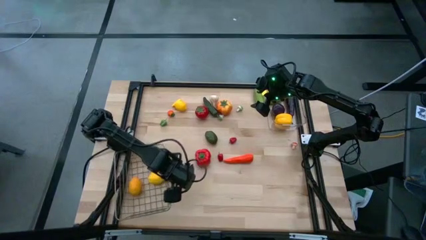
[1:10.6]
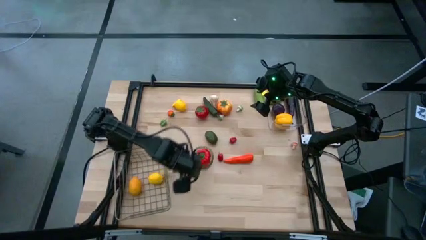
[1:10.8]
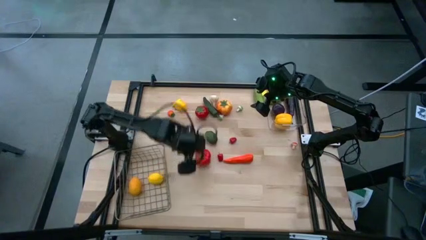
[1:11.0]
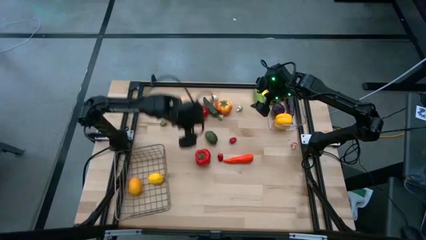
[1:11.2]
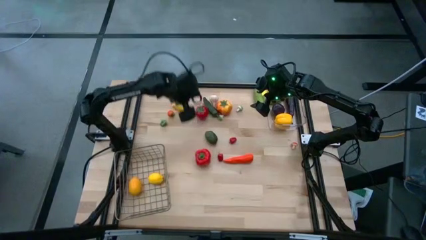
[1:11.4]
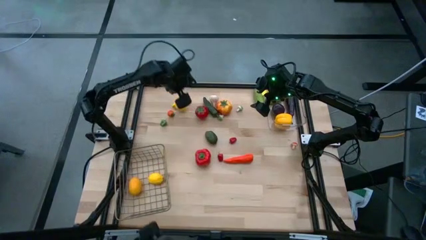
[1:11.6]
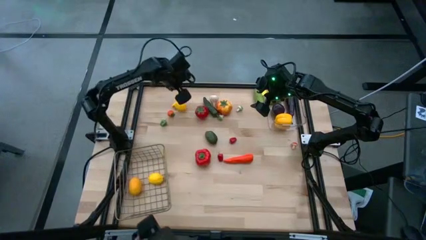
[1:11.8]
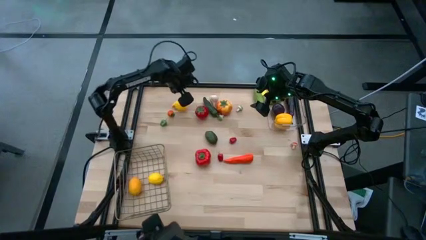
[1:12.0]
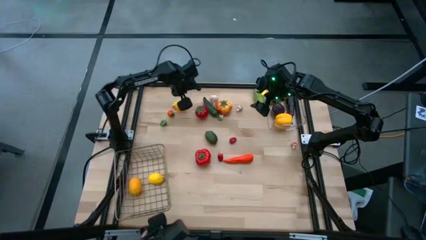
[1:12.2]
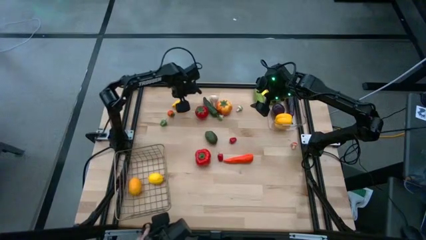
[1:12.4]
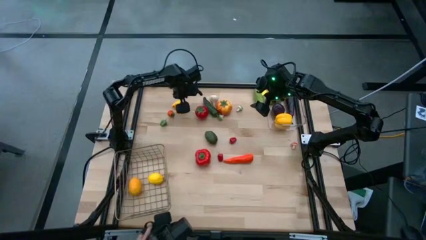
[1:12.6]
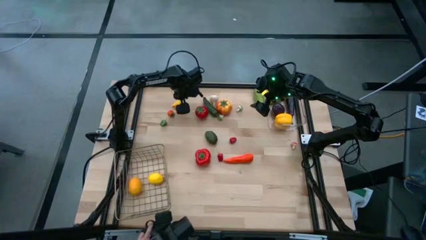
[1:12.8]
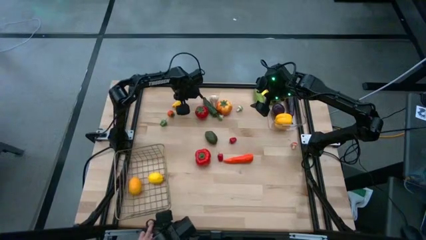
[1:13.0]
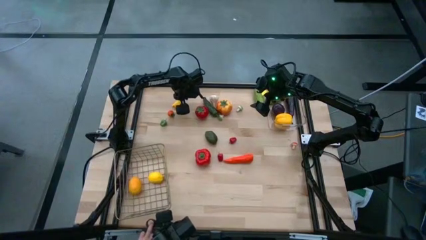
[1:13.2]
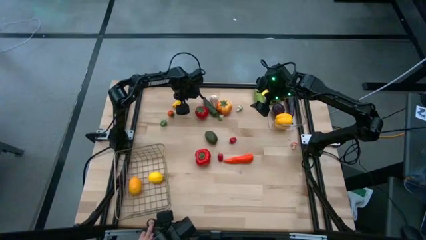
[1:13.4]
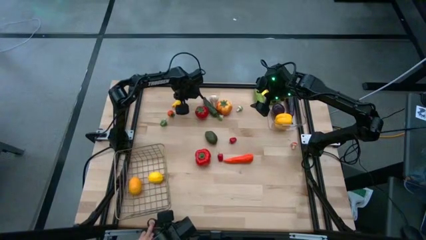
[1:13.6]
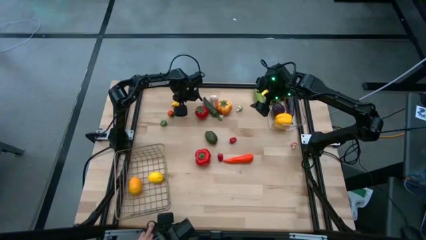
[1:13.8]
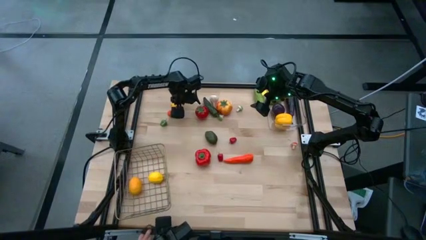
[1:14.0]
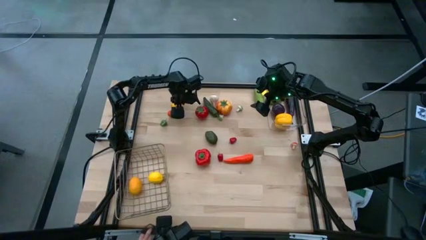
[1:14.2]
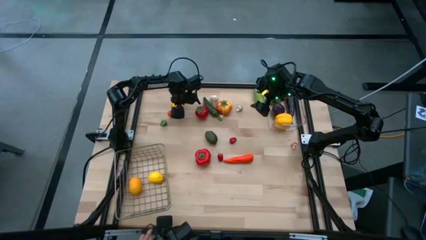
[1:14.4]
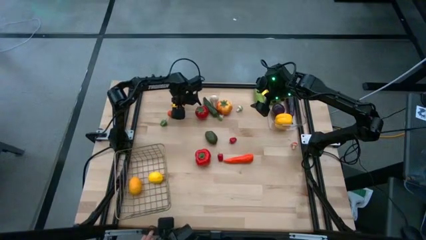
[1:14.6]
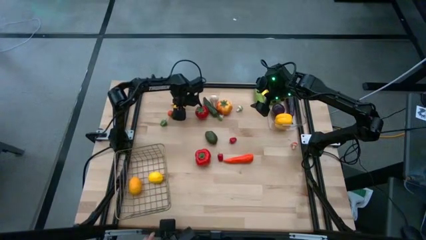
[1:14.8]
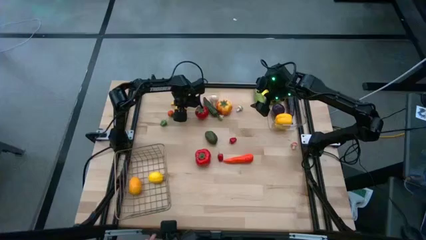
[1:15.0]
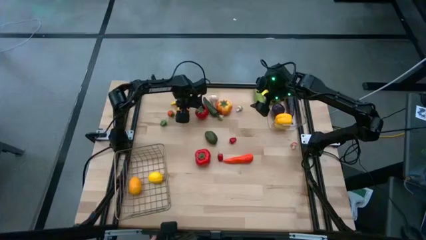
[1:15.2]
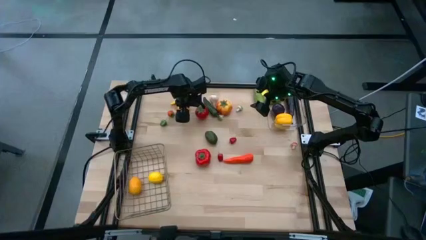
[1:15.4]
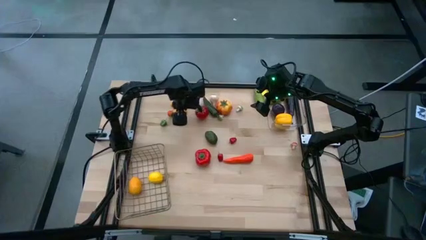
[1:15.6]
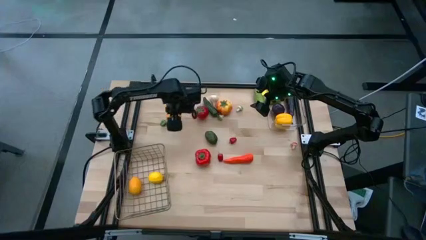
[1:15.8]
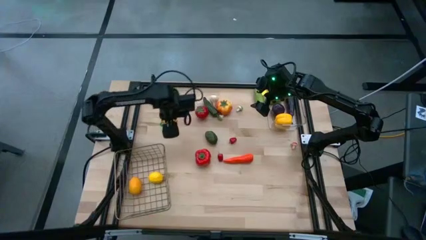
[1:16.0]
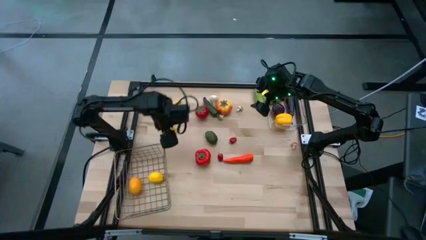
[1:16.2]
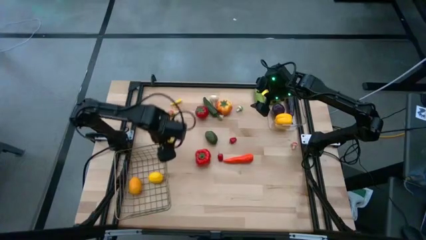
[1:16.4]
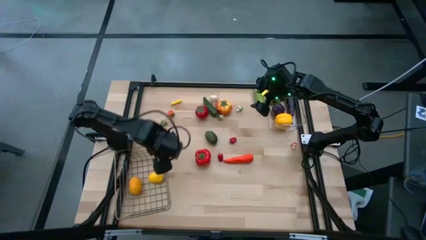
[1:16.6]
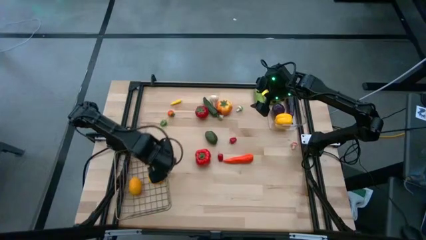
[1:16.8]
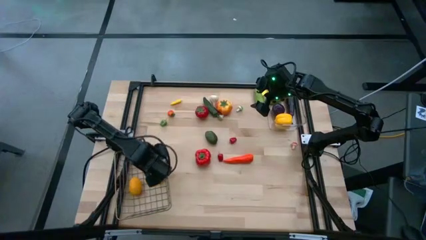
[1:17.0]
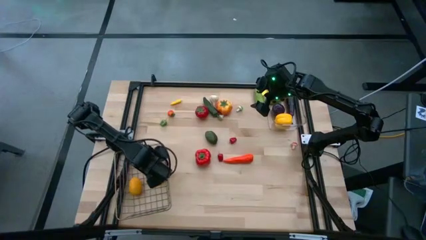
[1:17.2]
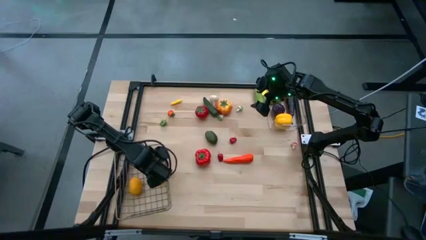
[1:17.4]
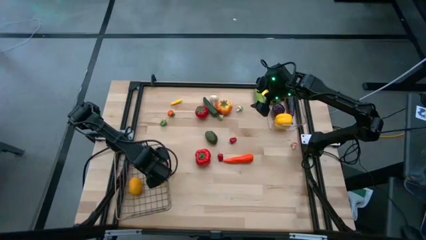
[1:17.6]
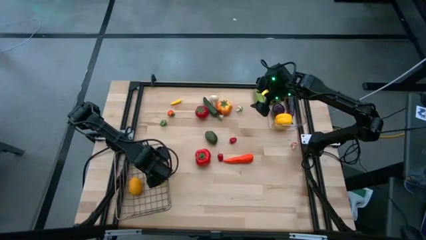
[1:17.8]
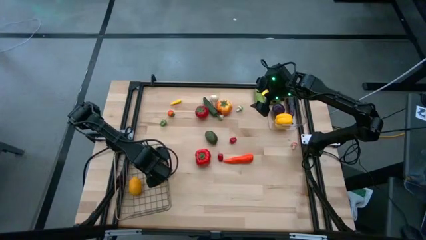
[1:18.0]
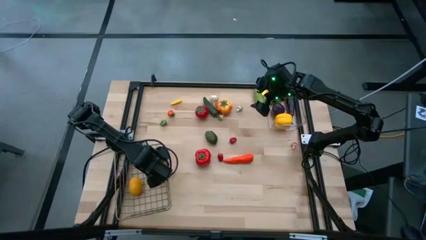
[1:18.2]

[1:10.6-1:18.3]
Task: Sort produce into baskets
Put the yellow lemon into the wire basket

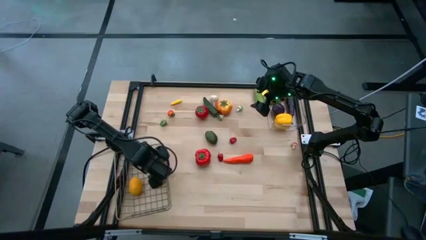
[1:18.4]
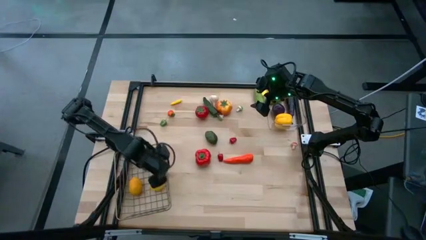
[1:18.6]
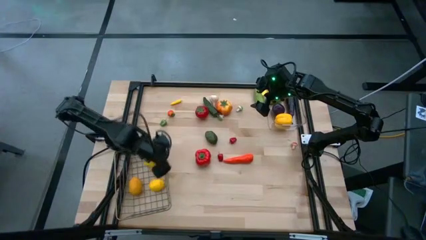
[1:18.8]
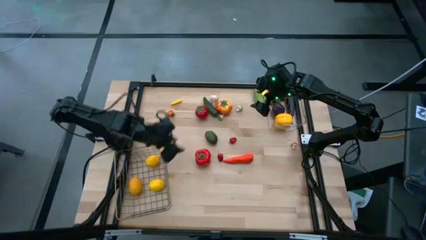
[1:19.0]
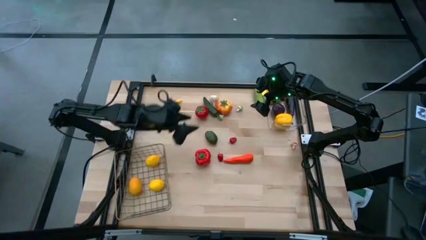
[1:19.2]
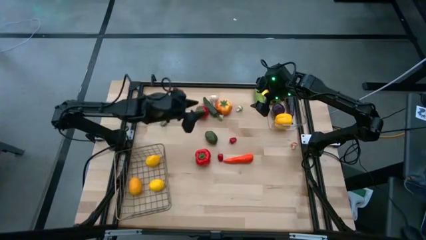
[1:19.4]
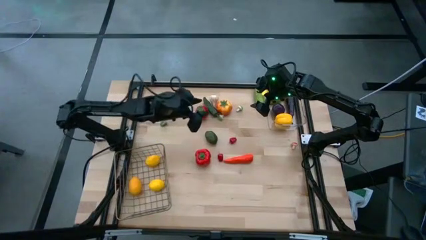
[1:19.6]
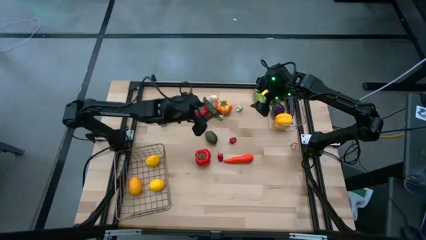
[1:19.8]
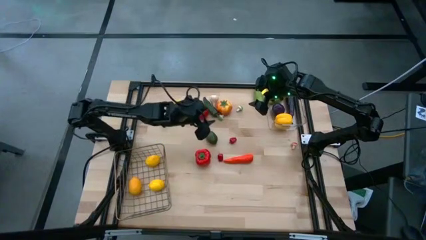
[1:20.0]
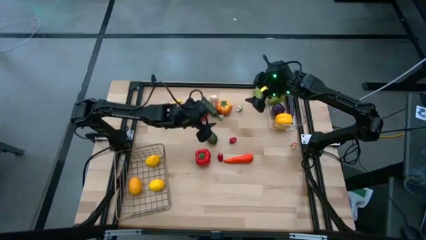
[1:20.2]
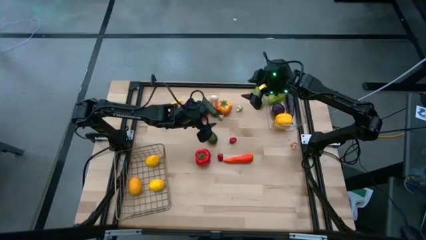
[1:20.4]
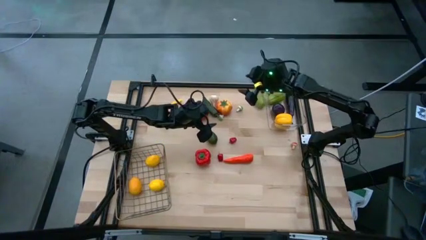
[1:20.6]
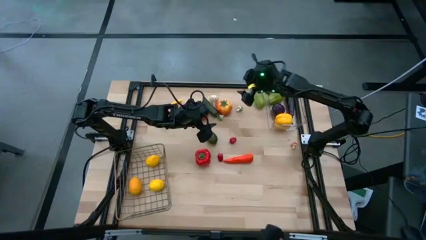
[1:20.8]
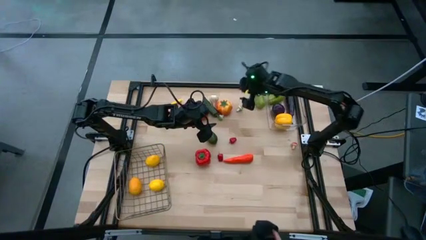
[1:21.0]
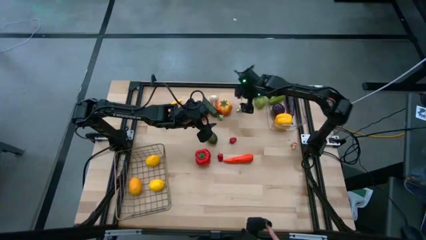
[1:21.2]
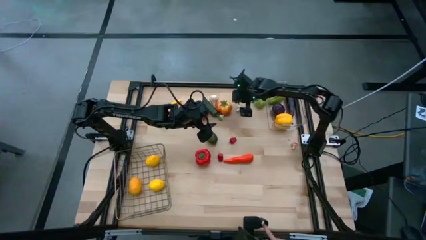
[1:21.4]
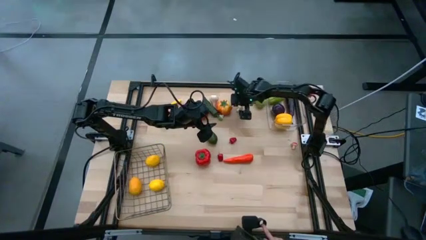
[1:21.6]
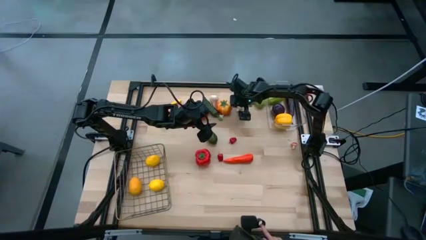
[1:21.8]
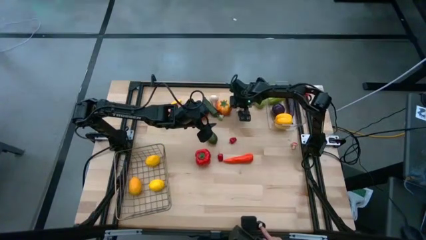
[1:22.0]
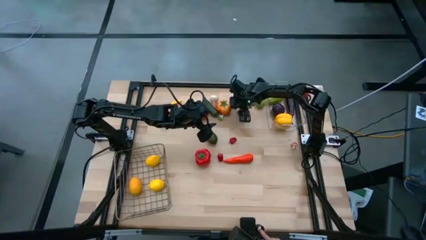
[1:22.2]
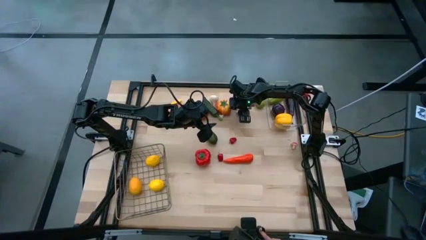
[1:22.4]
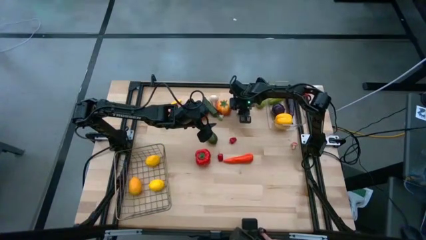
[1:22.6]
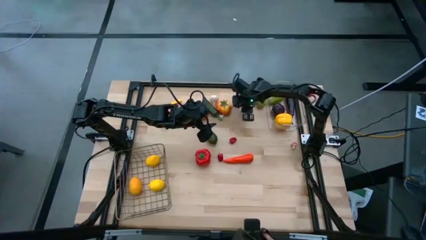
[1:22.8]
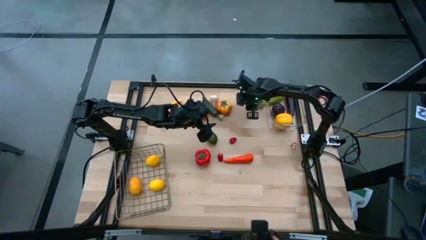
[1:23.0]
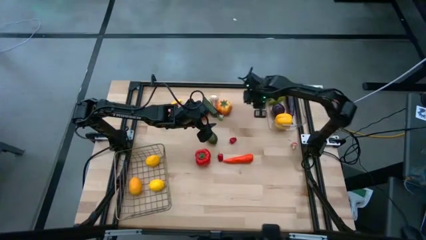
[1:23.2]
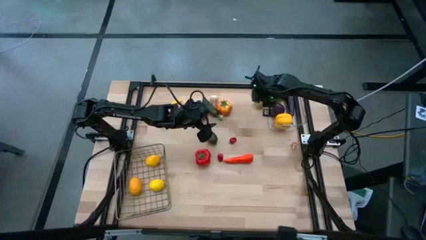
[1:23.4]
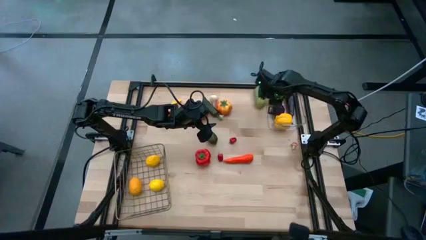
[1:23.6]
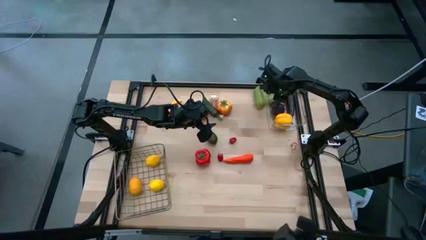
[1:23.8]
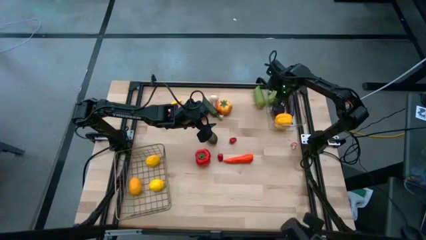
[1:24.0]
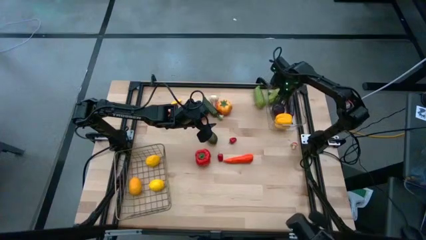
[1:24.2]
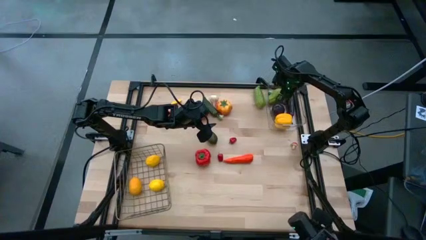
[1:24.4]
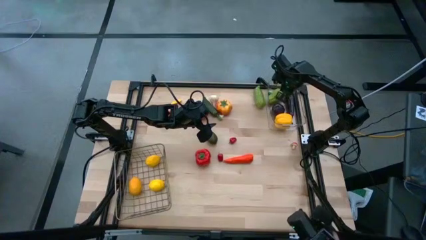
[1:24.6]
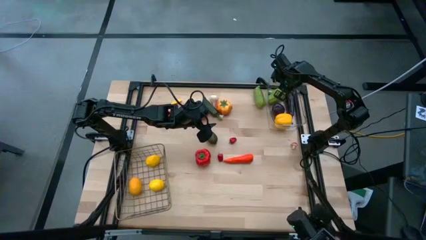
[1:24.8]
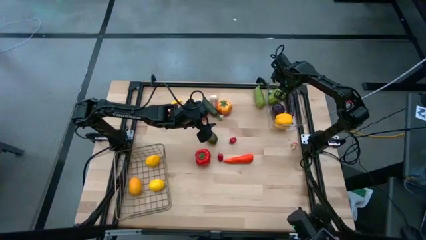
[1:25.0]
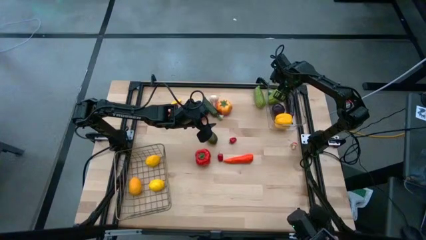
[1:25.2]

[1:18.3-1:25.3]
Put the right green mushroom into the transparent bin
